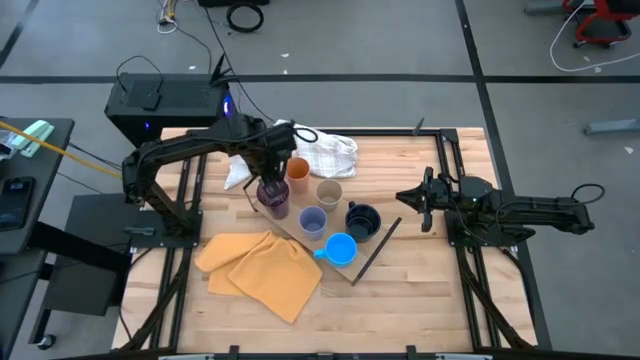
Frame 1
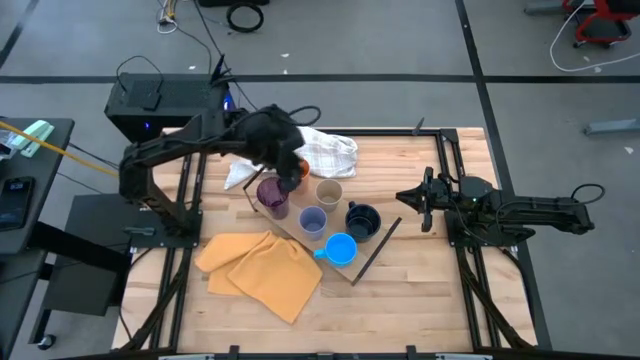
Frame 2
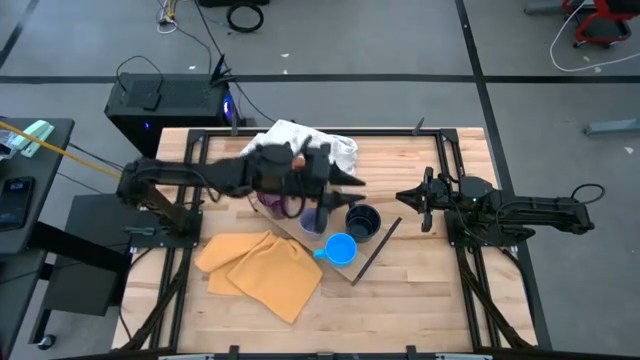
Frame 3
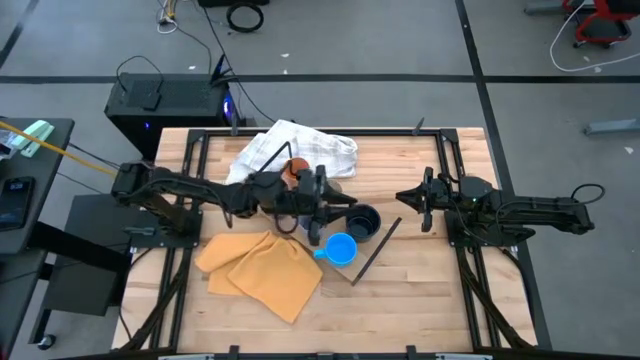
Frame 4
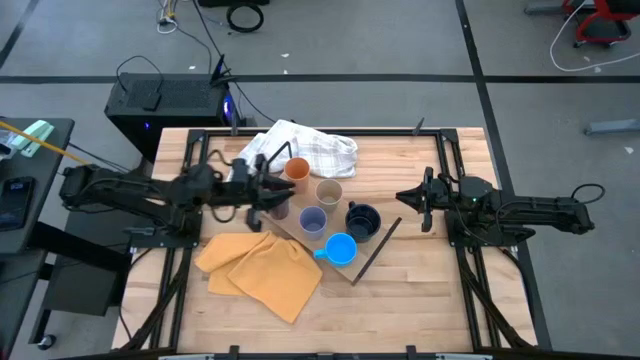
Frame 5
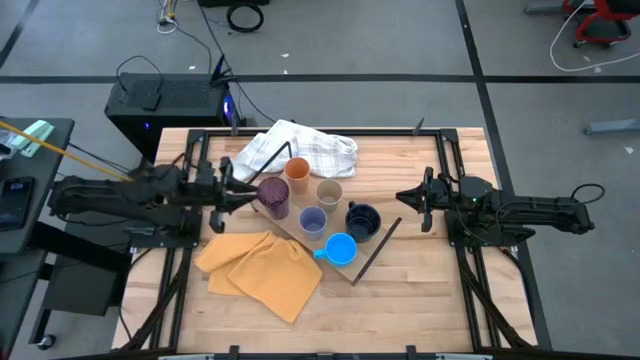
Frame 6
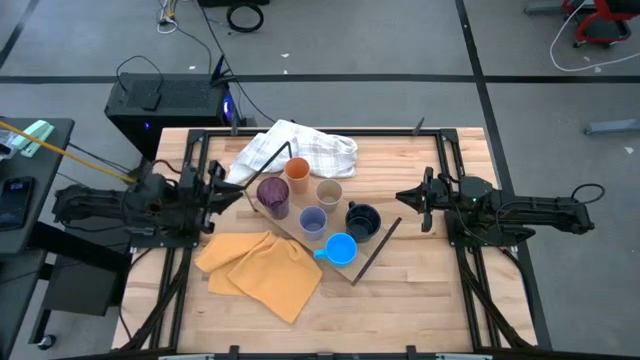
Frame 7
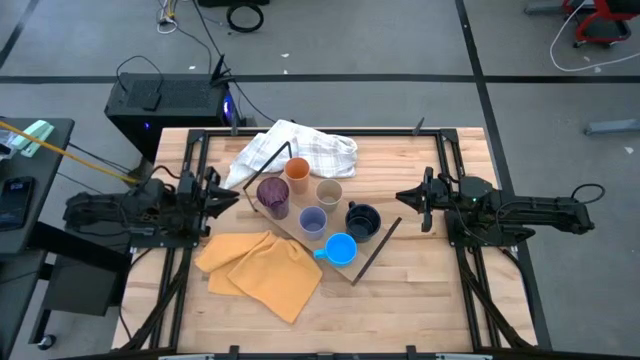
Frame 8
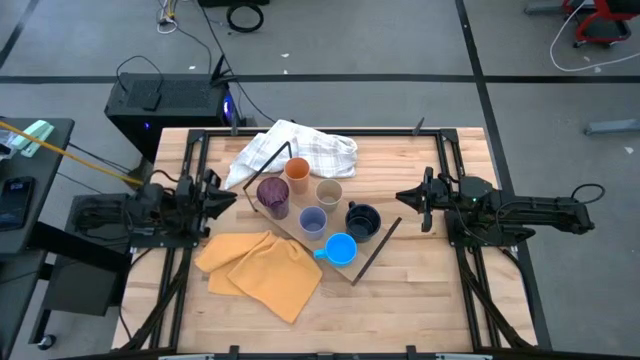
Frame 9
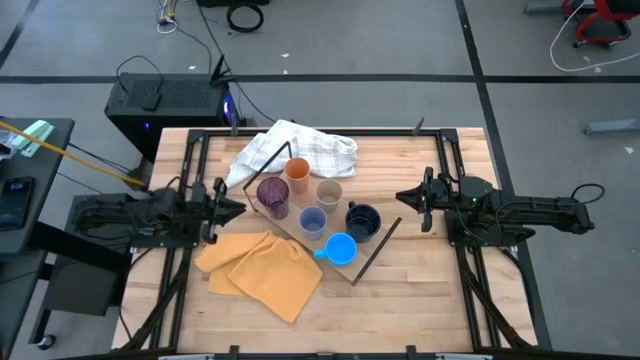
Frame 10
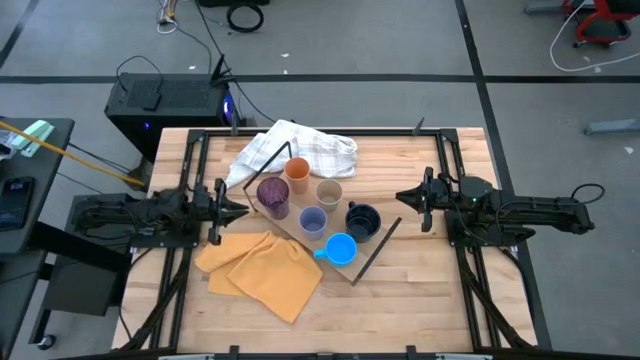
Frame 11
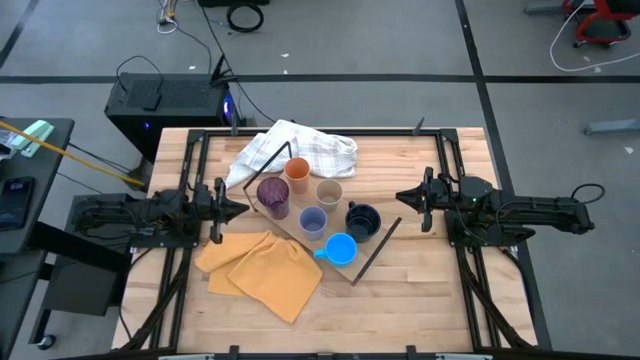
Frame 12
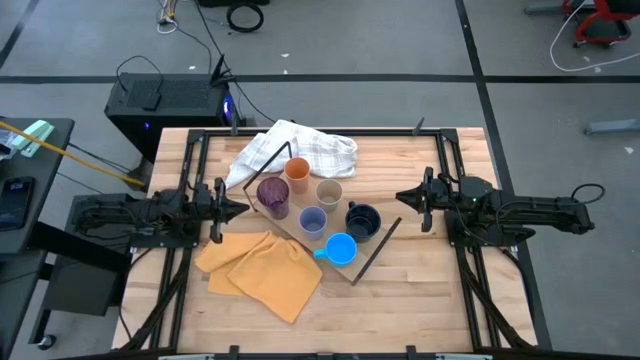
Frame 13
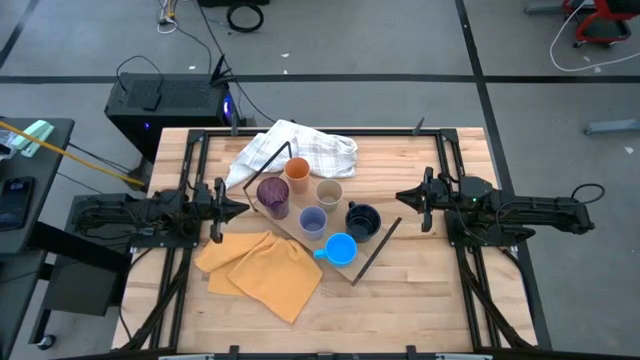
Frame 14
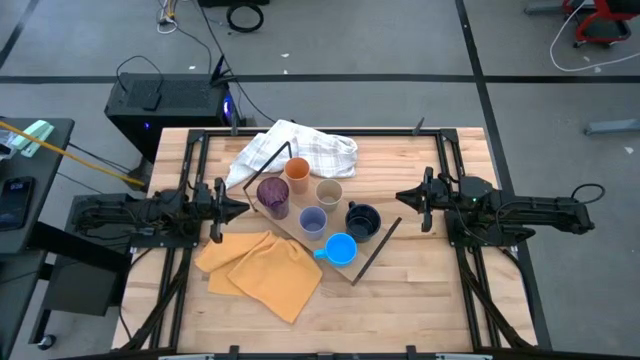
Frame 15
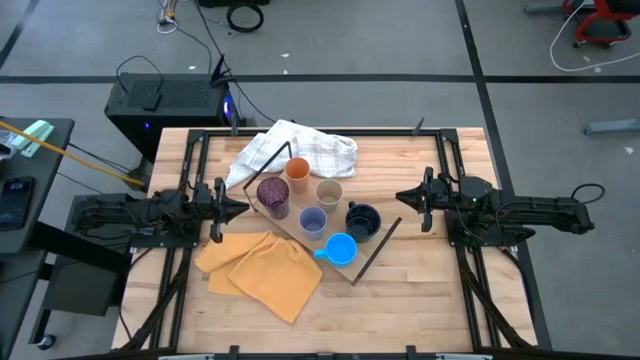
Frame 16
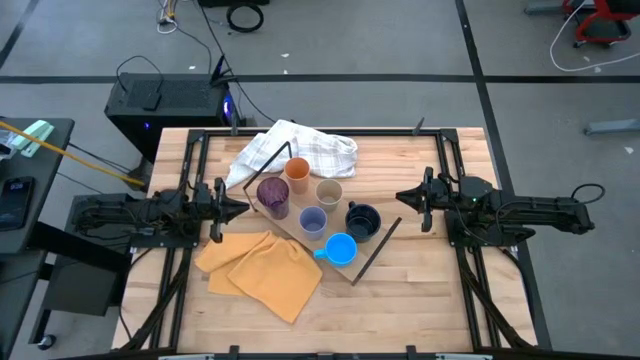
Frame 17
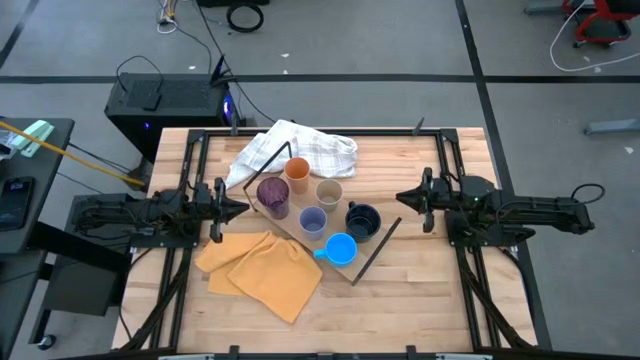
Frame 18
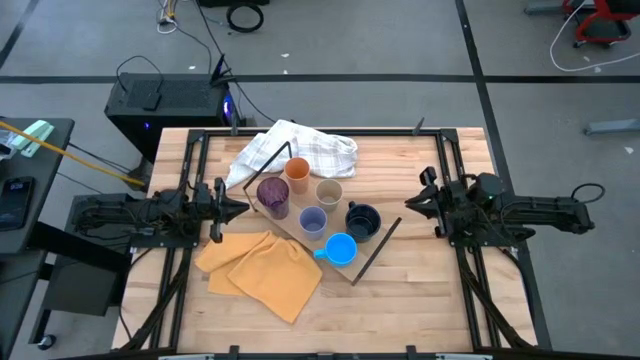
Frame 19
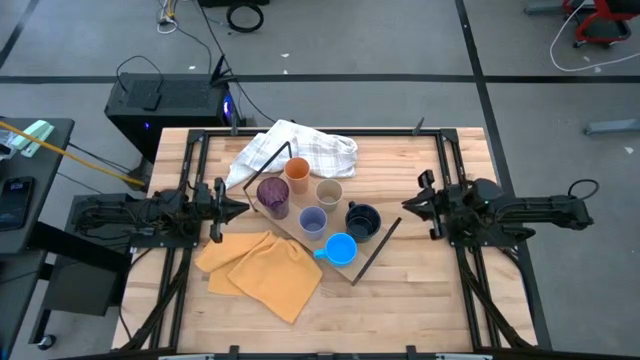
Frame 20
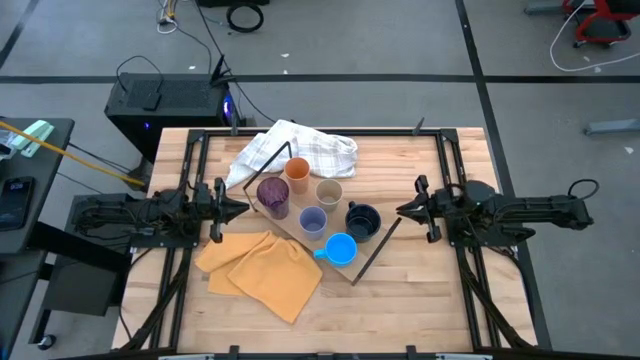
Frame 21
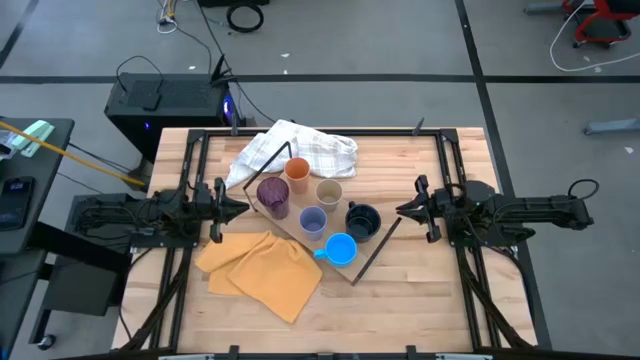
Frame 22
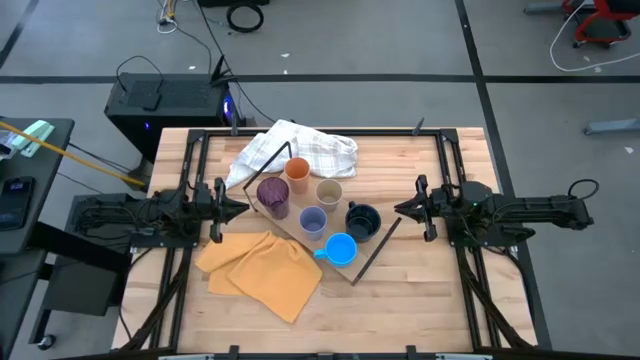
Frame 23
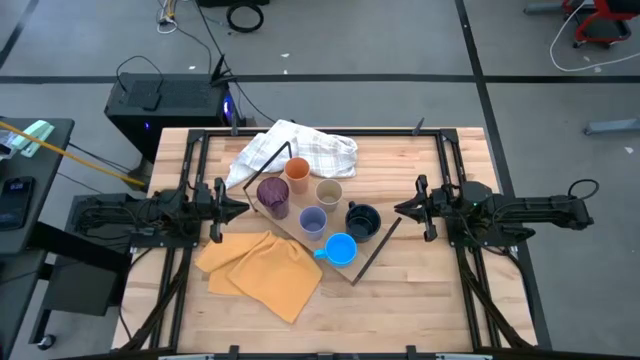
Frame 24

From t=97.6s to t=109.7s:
Task: Stack small to large cups/mugs on shelf
Return to Home Position

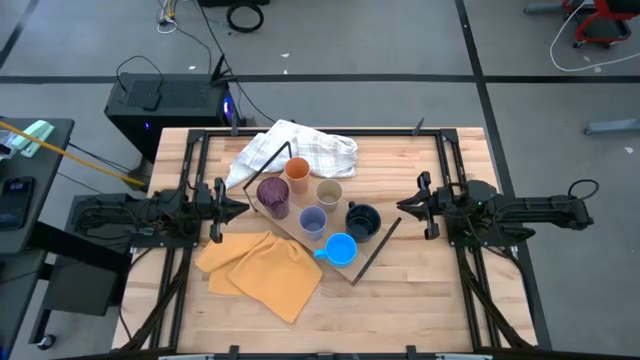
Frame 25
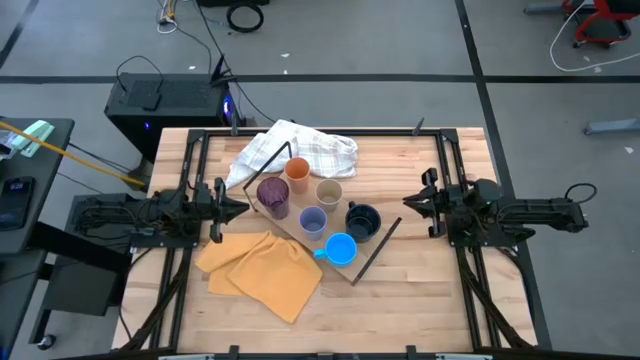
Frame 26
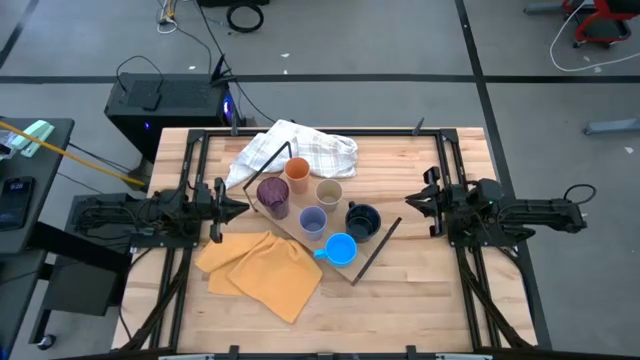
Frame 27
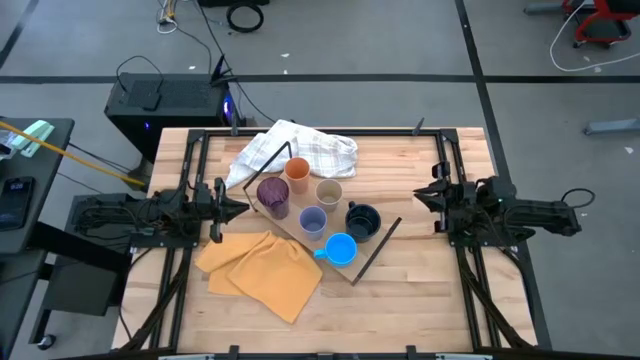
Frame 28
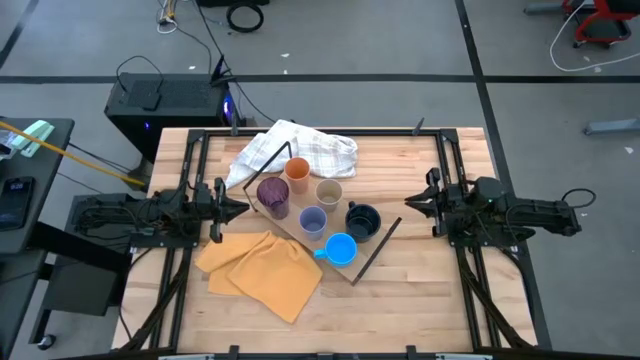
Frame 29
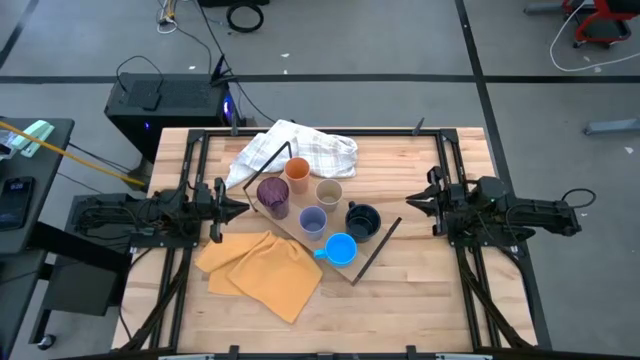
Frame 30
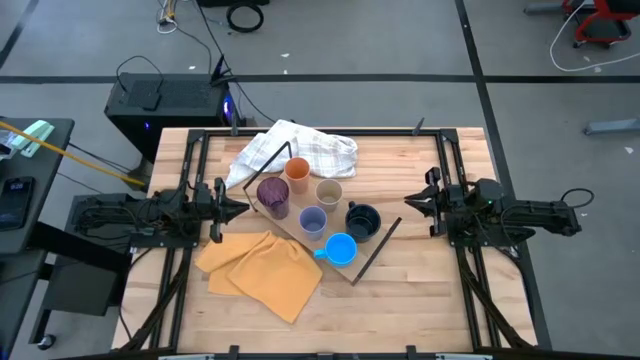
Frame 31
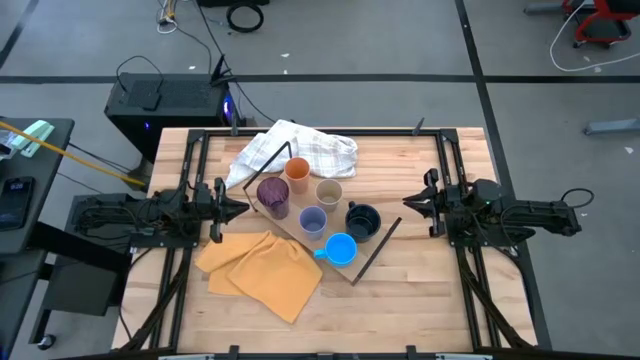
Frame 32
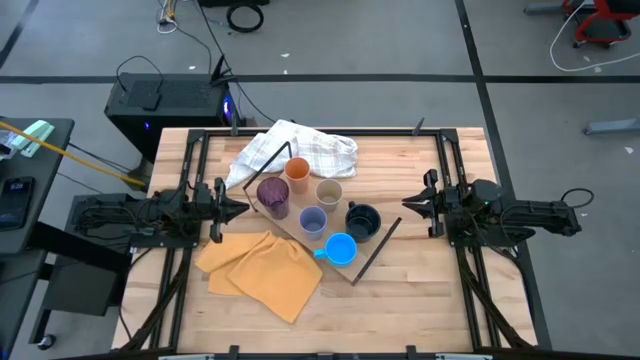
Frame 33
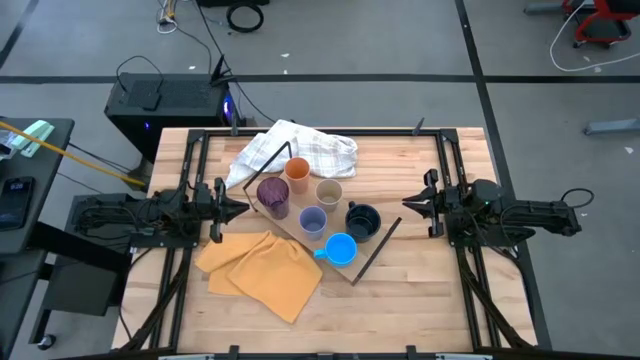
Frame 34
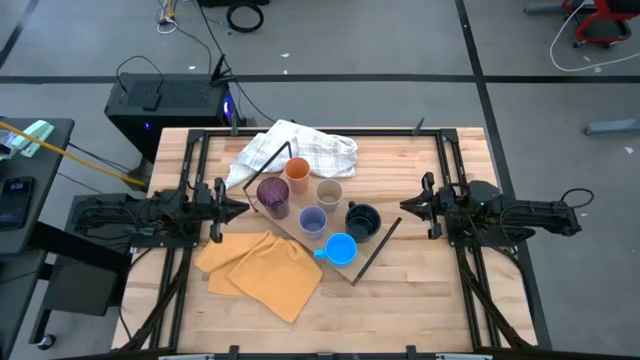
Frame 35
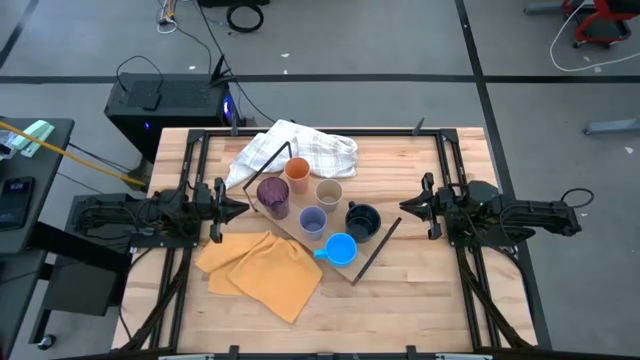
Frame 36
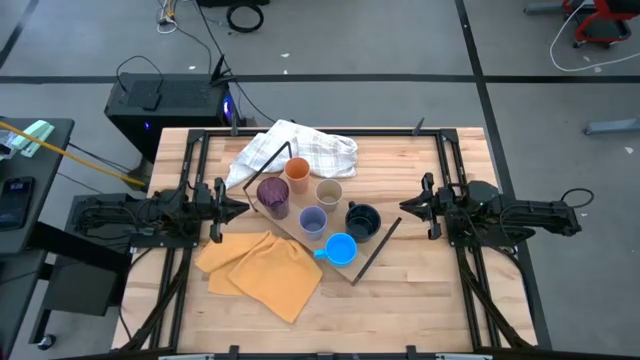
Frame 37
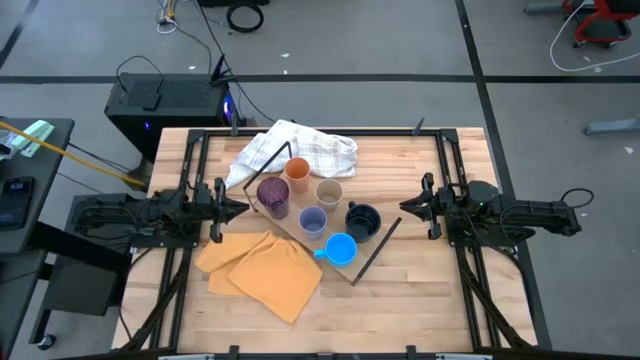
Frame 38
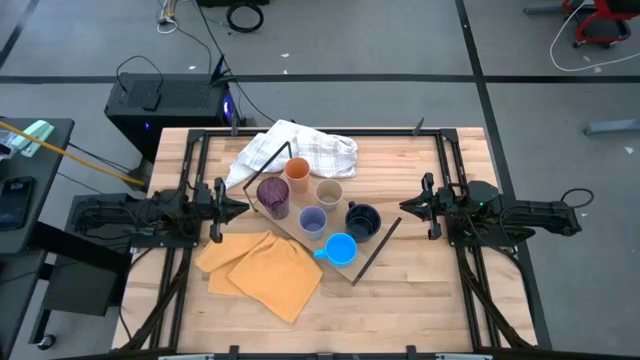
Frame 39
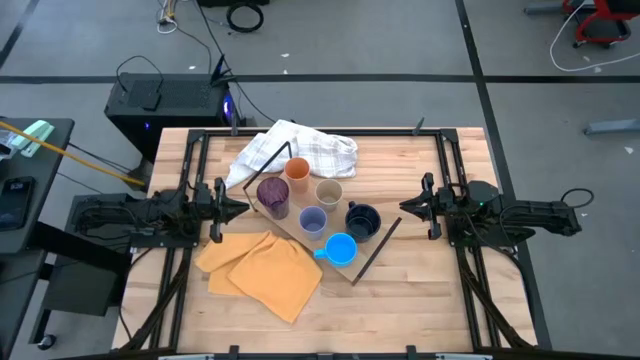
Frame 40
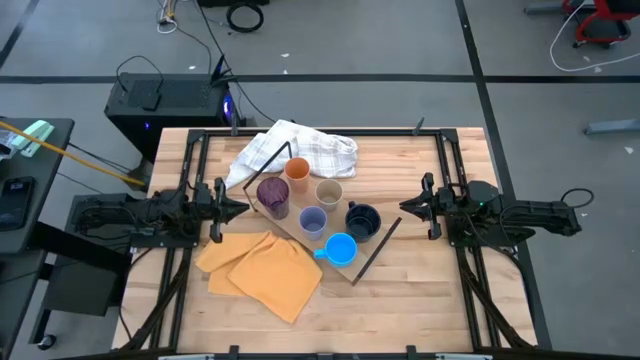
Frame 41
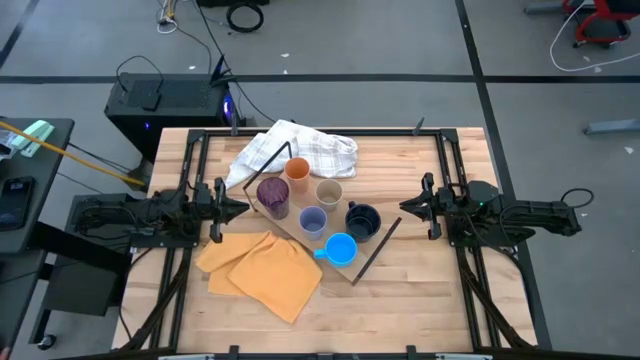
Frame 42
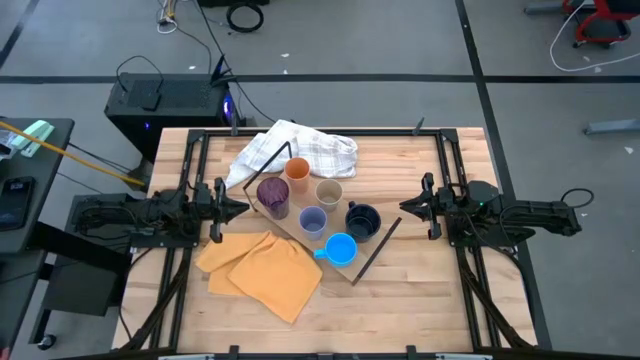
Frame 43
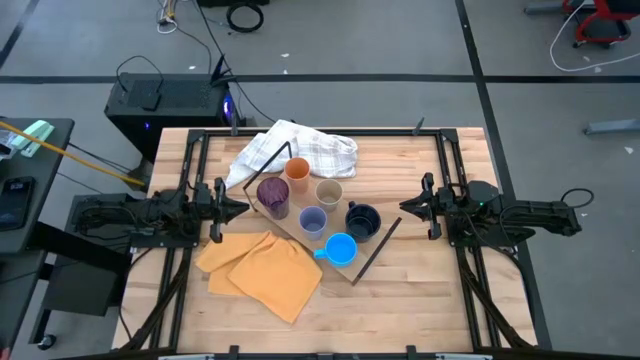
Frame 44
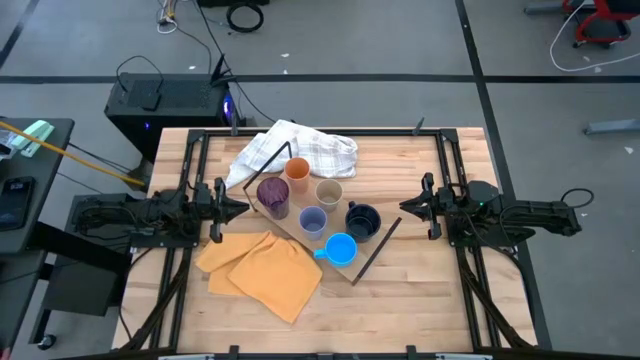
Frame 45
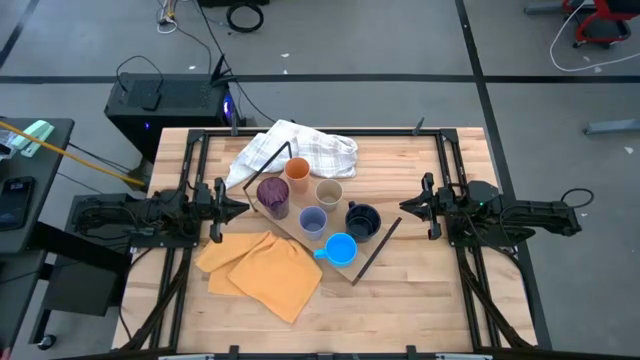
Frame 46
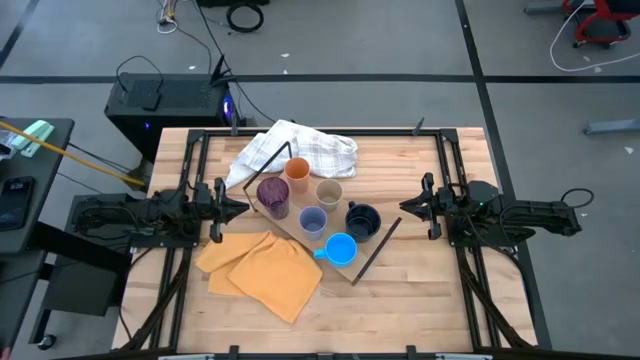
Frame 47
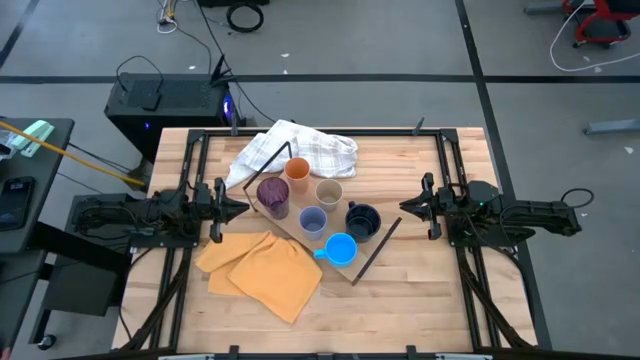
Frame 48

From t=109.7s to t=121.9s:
Return to Home Position
